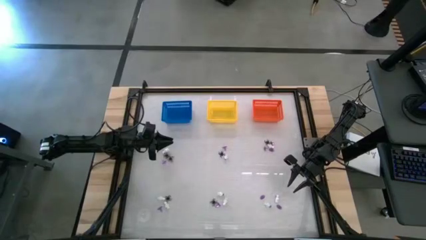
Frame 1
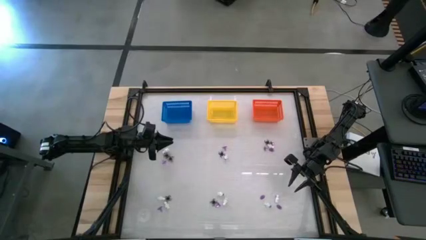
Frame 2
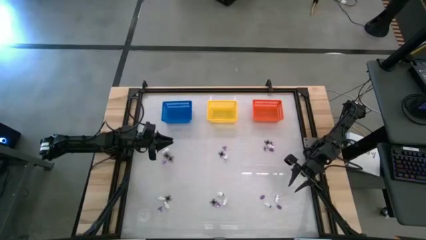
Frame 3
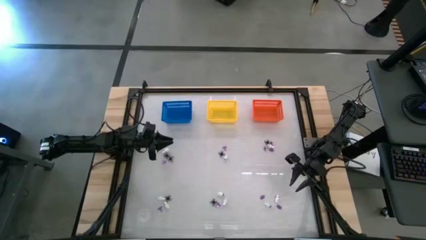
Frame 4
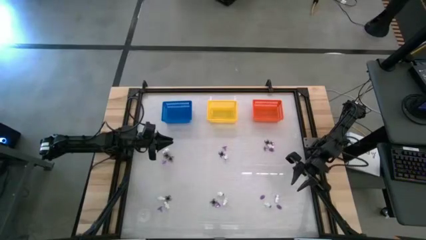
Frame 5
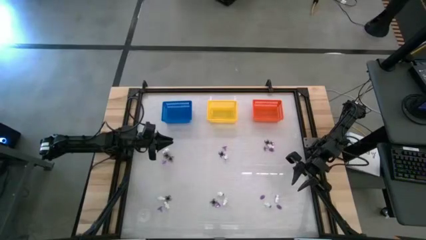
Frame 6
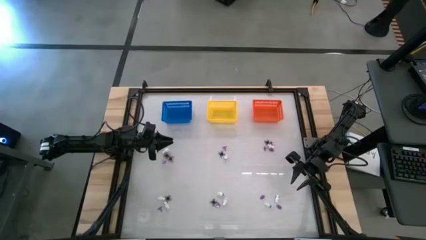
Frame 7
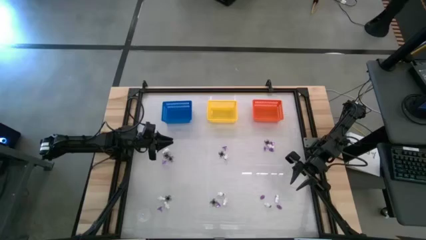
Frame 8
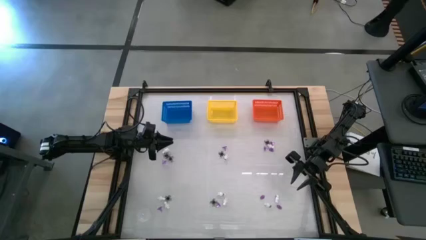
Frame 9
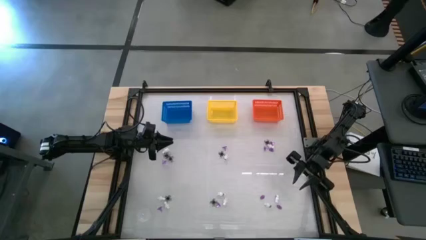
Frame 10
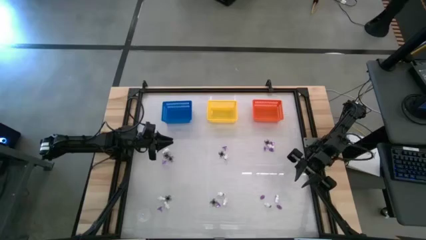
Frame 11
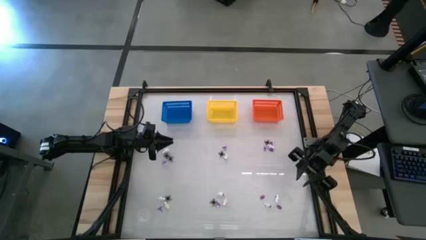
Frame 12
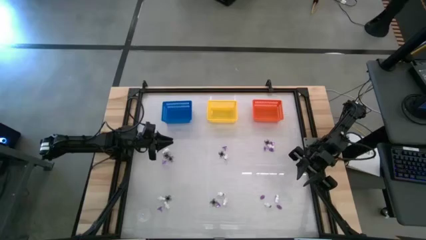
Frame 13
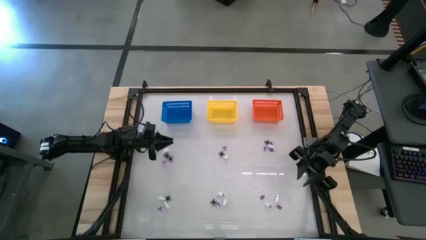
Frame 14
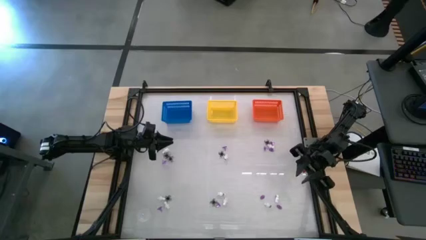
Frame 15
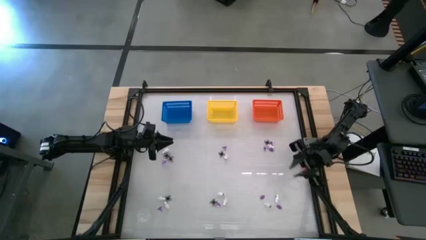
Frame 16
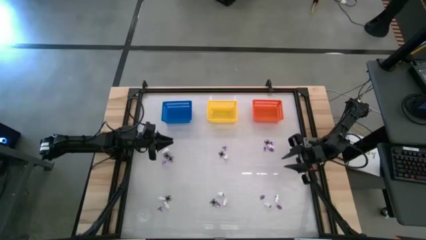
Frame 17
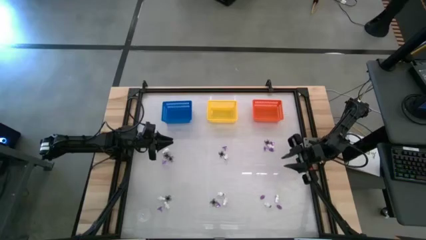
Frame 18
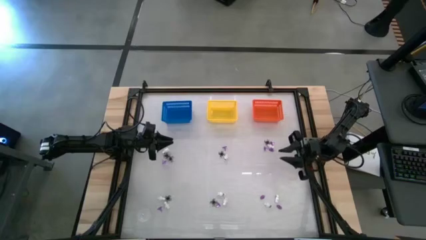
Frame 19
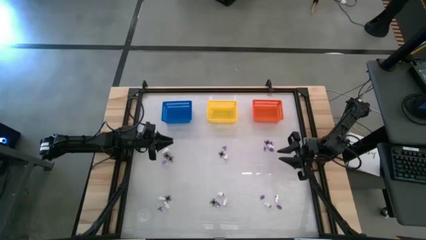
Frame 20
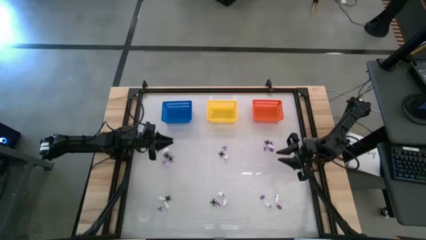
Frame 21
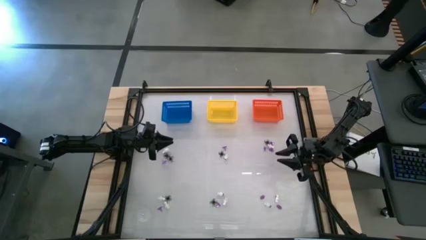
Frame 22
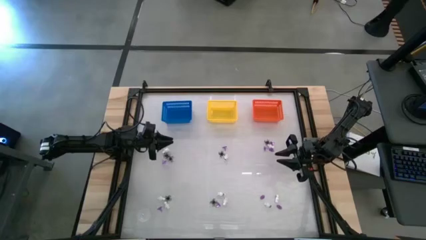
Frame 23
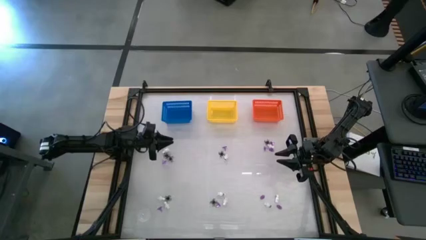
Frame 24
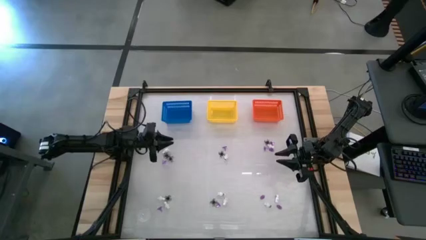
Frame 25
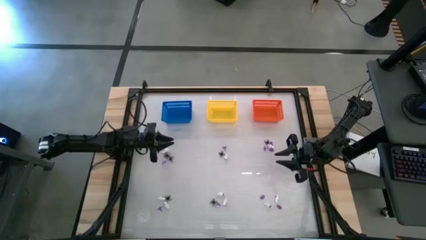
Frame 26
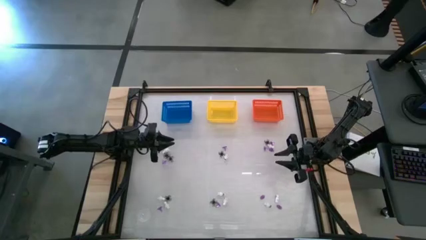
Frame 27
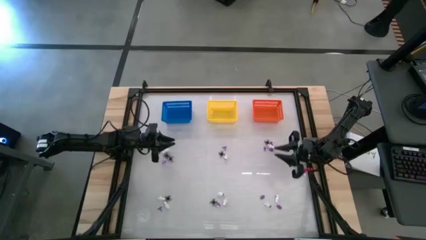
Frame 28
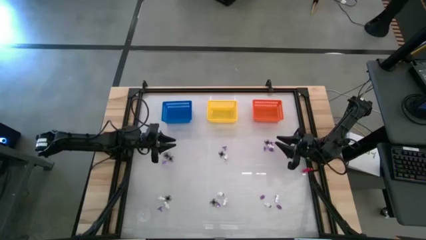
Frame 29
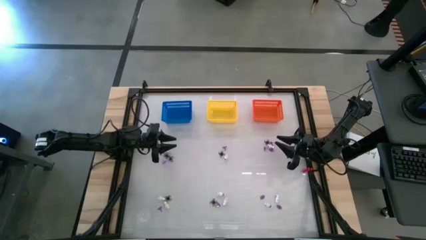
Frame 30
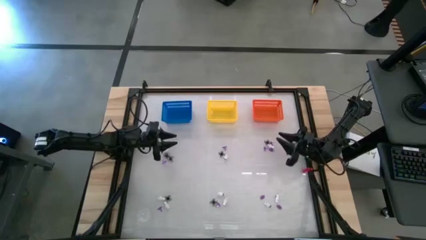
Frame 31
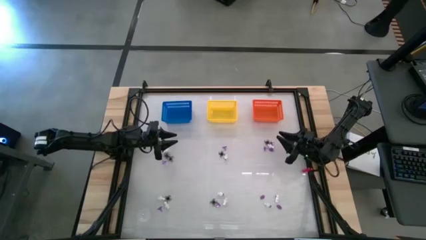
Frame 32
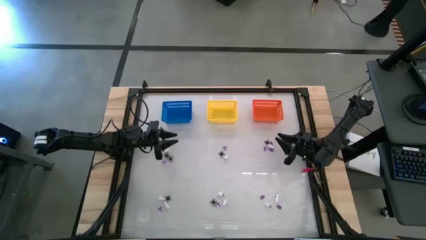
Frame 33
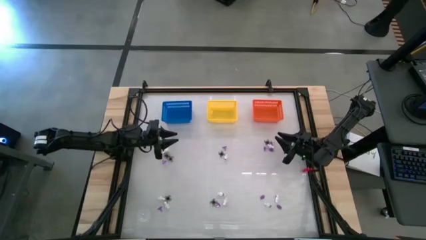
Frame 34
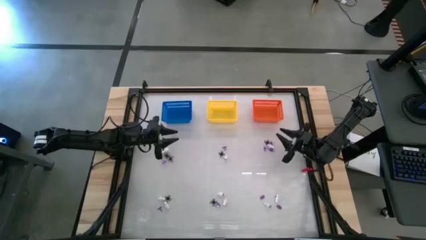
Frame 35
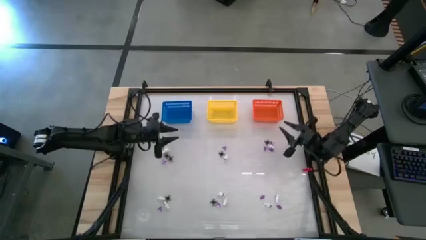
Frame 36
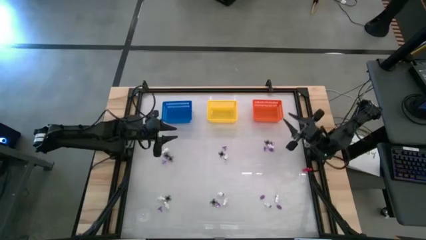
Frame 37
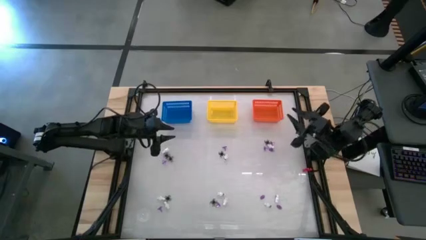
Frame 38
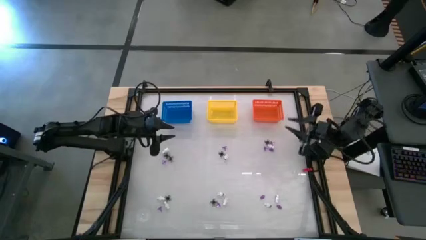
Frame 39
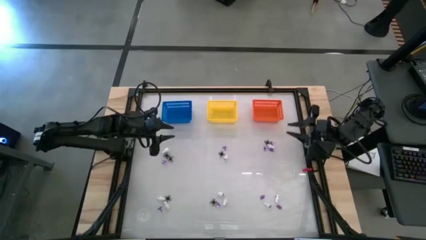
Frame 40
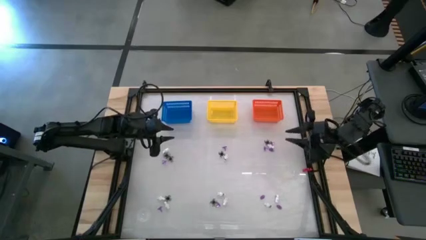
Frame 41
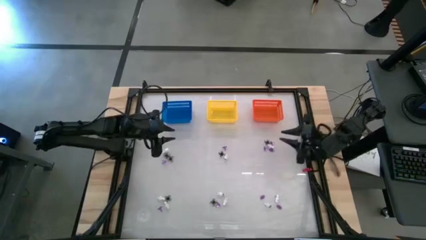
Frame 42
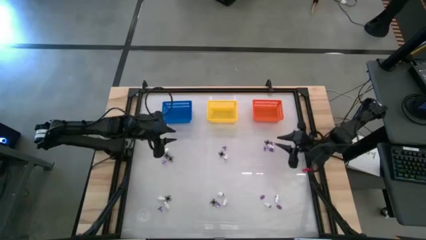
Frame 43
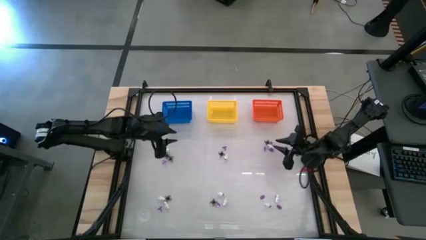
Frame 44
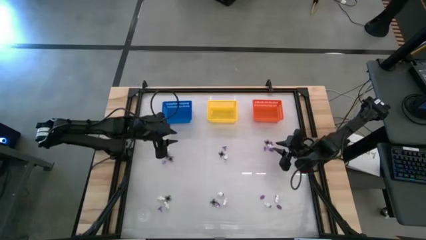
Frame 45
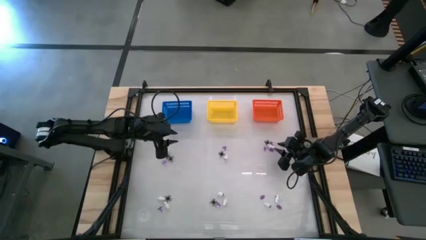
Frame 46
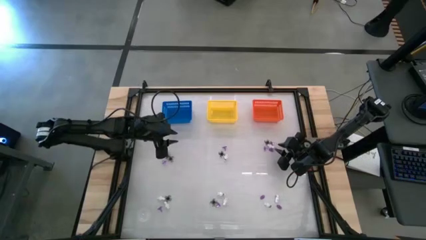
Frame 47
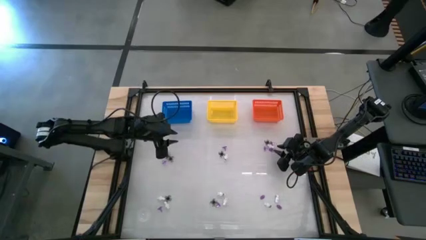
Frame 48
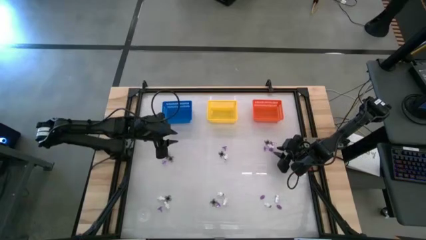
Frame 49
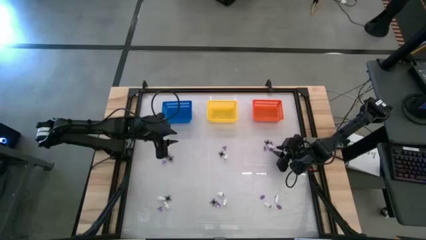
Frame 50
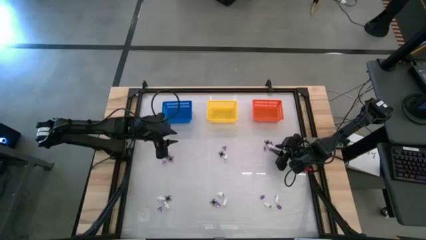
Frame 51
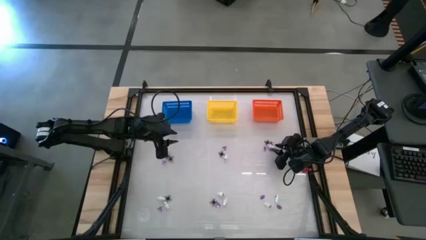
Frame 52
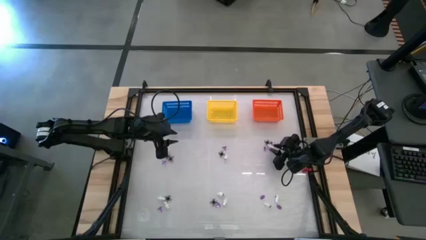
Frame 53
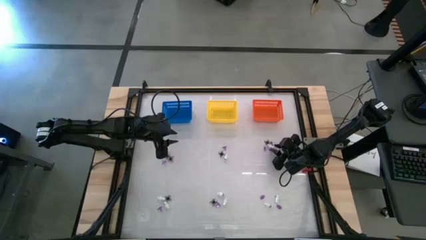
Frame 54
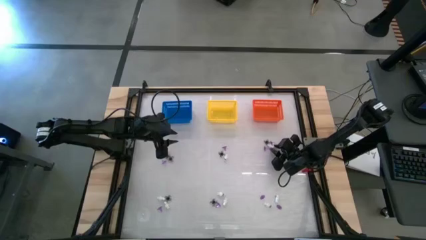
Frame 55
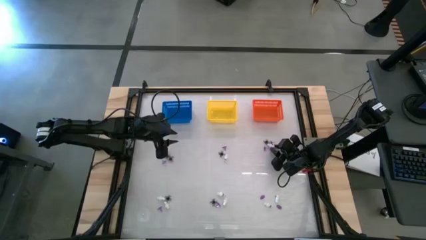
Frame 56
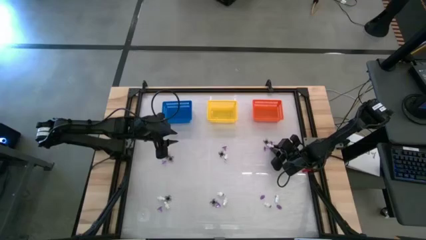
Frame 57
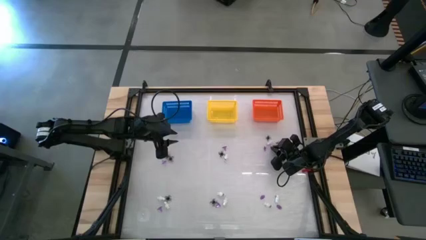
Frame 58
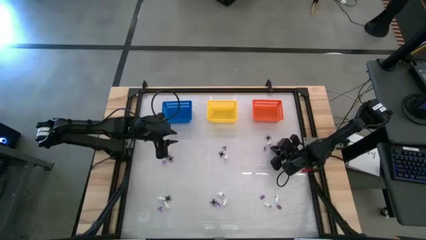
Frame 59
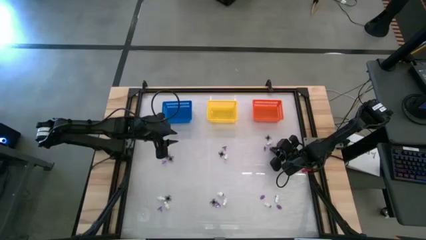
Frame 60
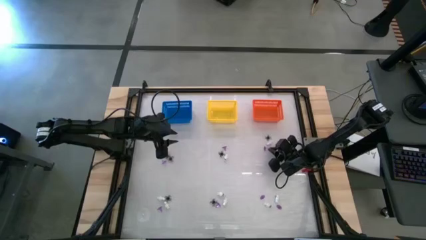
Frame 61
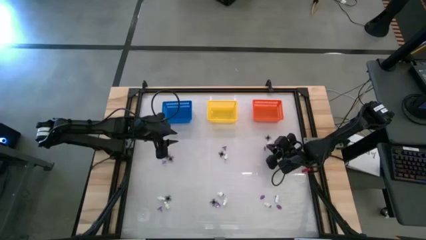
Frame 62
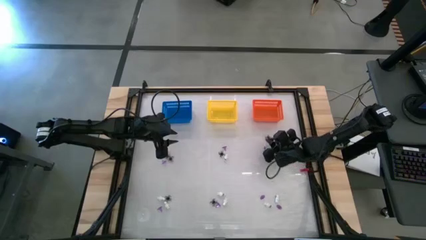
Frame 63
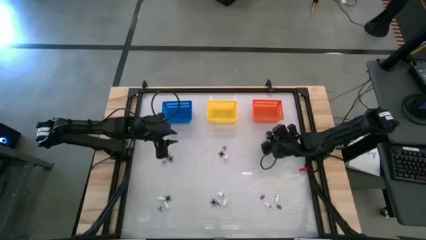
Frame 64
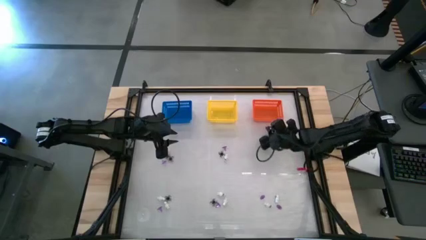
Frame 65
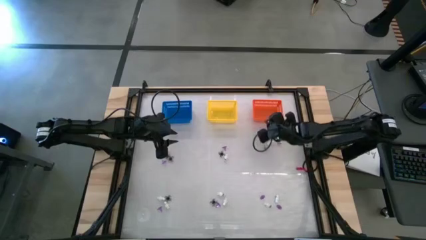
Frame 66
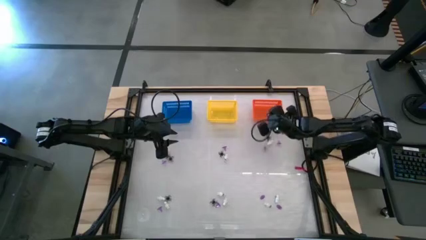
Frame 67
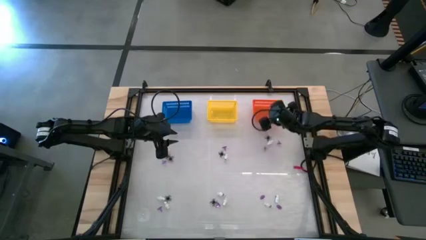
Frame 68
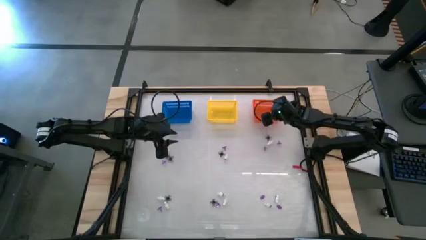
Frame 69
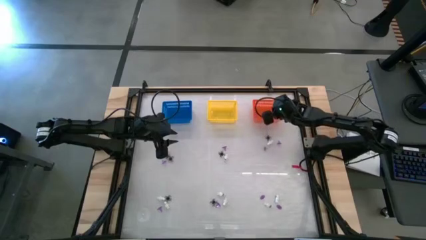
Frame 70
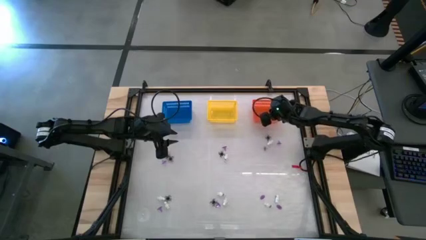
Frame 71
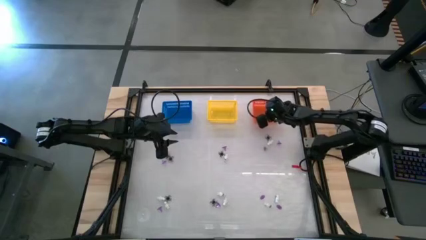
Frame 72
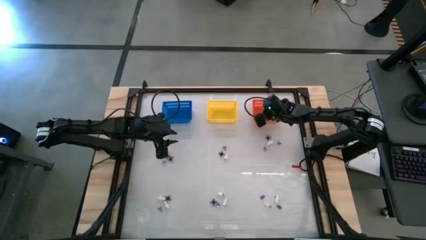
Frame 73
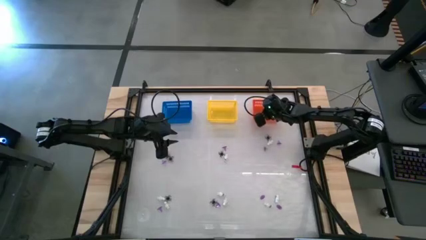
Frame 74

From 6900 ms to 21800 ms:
Task: Sort Halloween decoration
Put the purple witch hat toy into the orange basket
